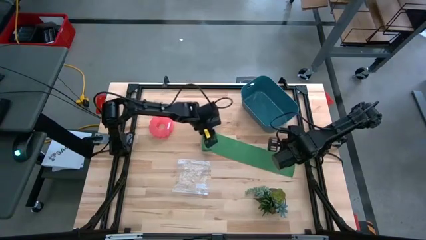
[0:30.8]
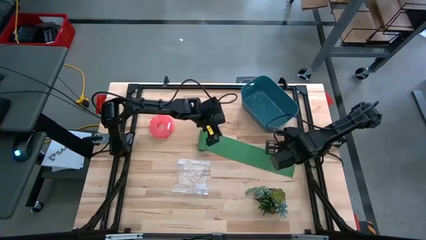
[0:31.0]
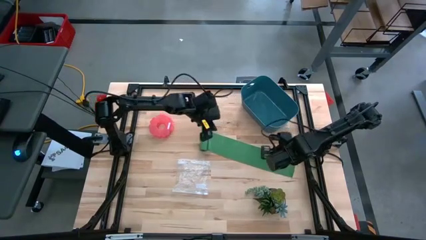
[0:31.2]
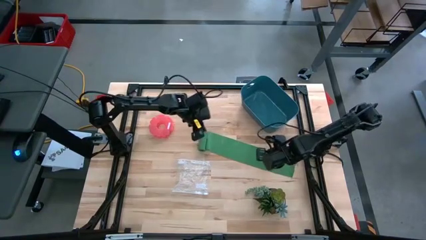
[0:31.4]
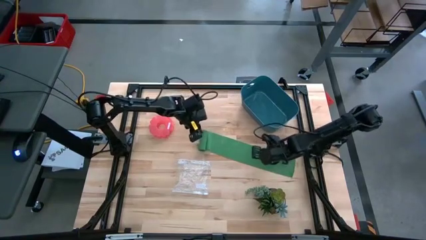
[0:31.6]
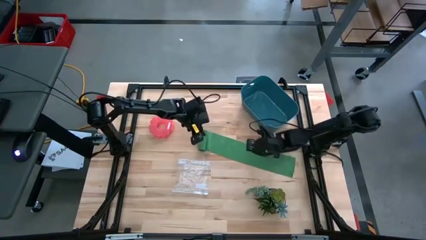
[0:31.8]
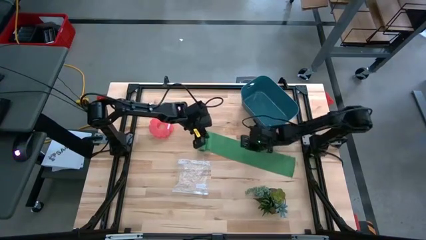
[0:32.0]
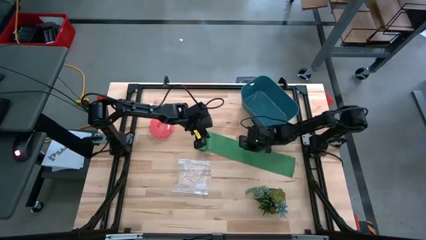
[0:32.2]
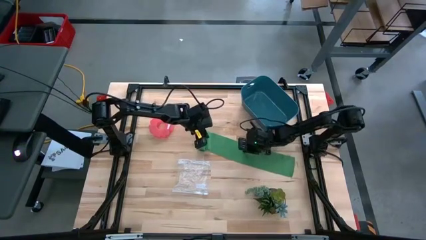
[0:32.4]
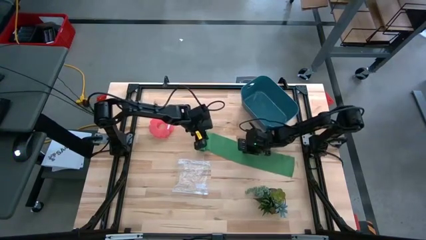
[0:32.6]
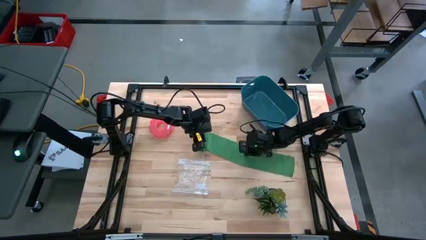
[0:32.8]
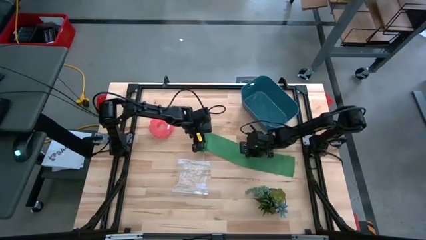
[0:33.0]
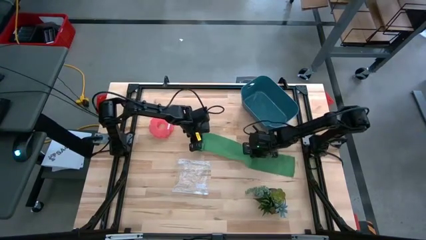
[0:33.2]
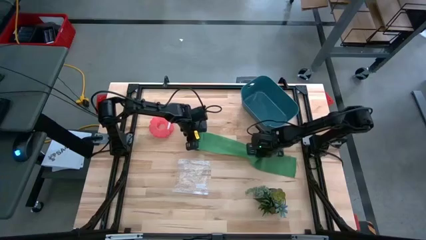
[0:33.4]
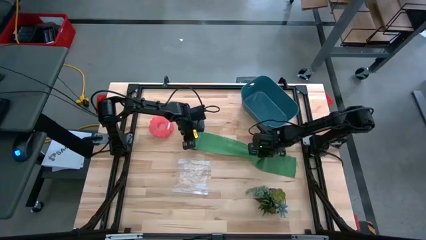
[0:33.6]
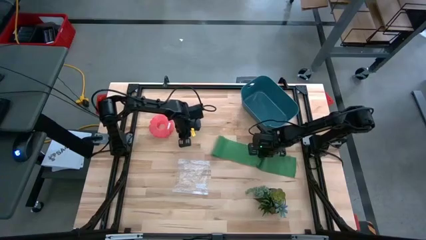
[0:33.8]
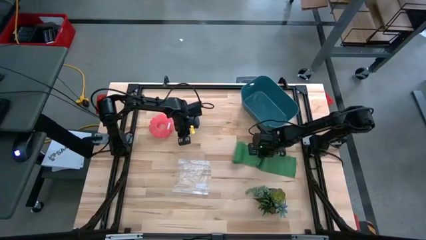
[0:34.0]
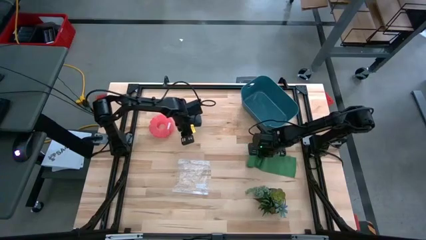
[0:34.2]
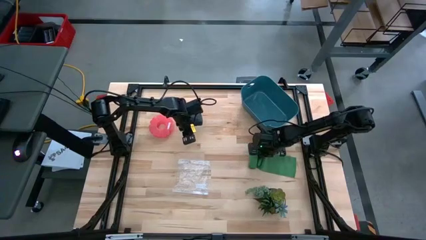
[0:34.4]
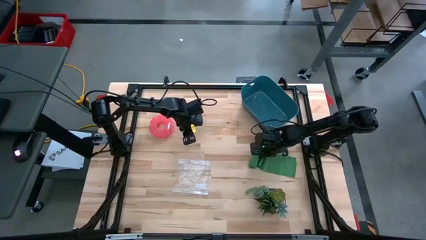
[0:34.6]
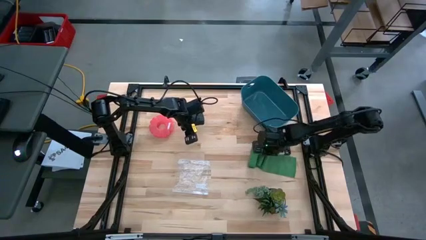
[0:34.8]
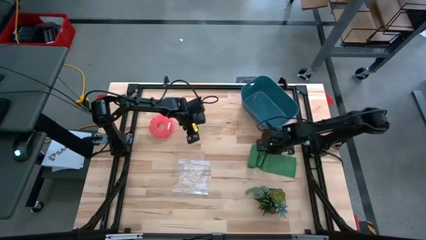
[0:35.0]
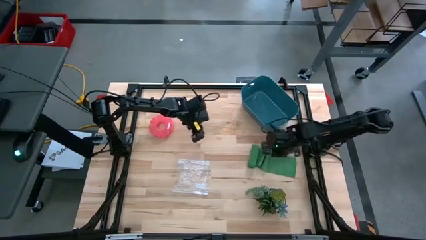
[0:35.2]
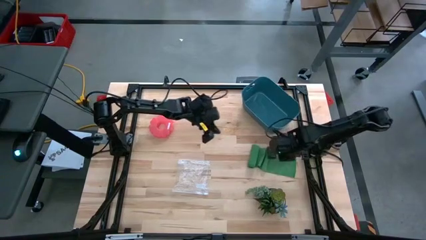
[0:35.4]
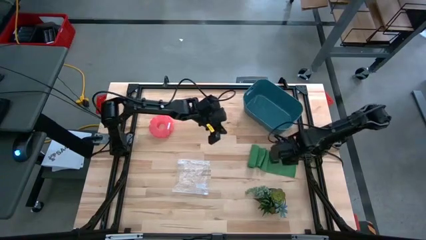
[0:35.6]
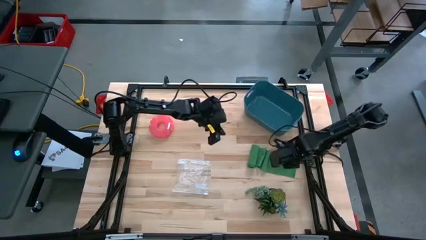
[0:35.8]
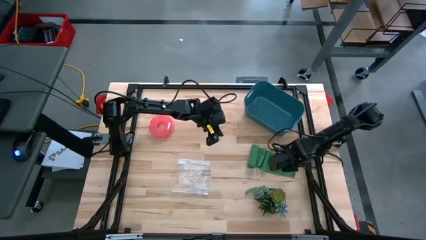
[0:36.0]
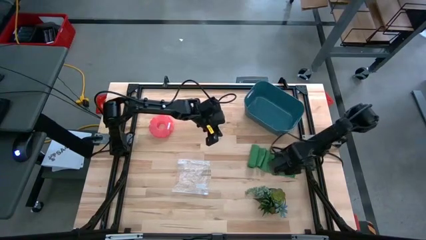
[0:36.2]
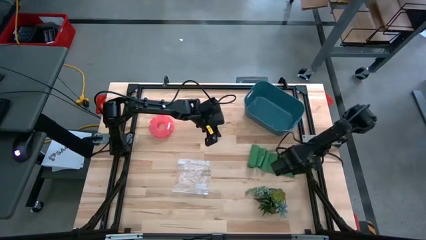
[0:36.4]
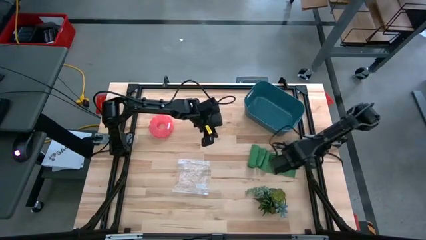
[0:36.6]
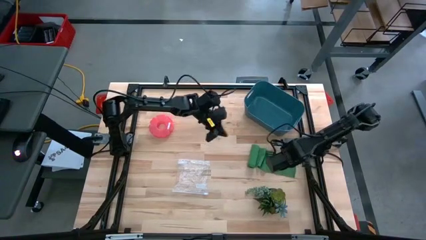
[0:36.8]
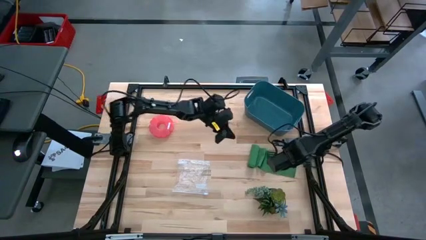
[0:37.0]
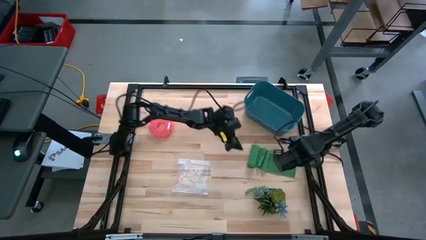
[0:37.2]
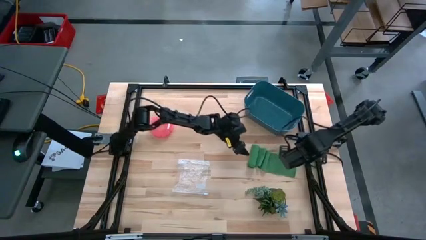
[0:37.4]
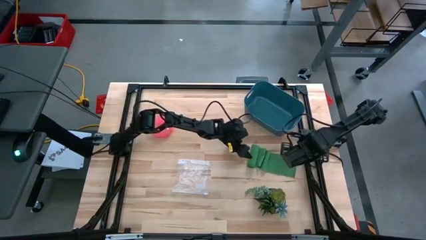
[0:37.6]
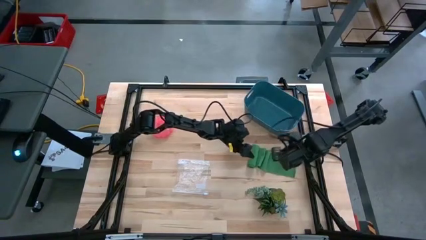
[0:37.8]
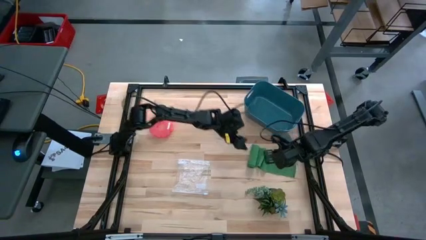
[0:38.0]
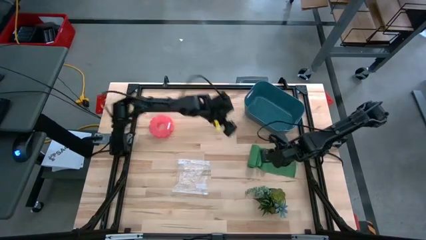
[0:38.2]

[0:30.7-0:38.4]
Task: Roll bandage
Roll the green bandage

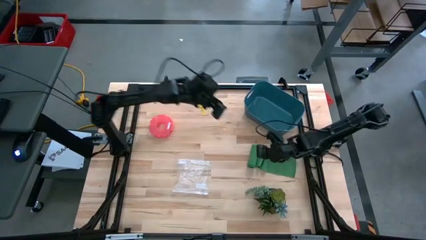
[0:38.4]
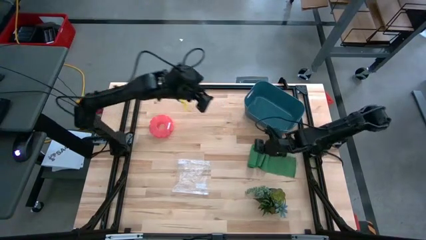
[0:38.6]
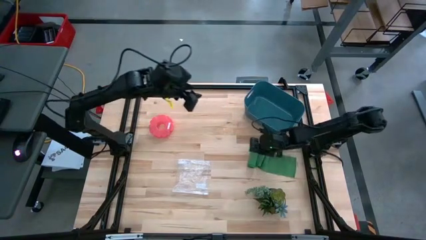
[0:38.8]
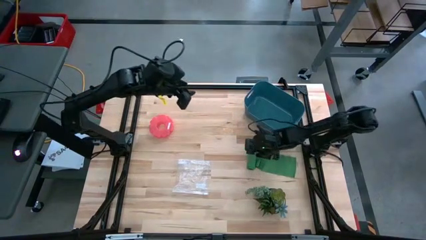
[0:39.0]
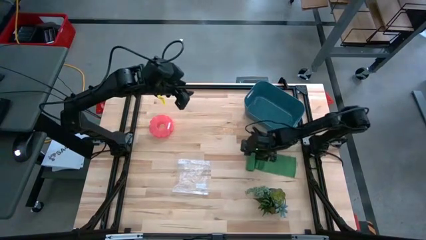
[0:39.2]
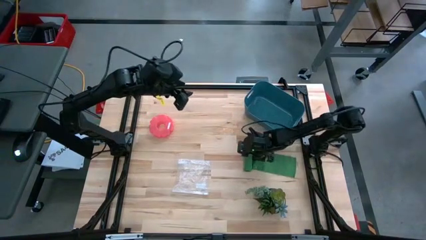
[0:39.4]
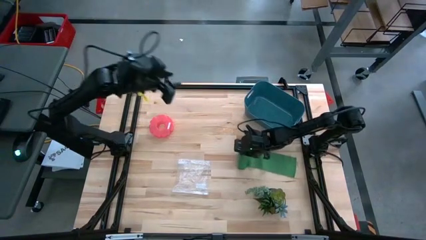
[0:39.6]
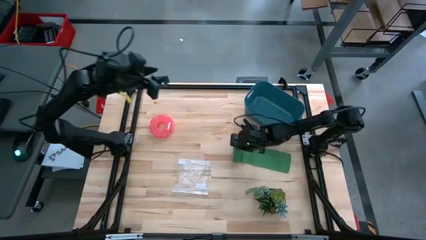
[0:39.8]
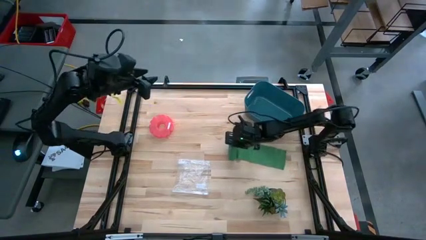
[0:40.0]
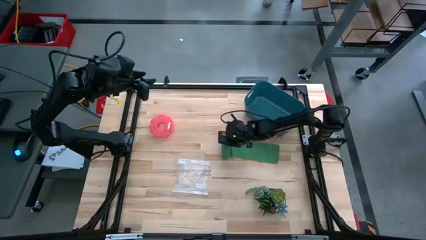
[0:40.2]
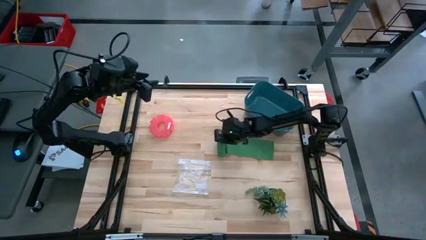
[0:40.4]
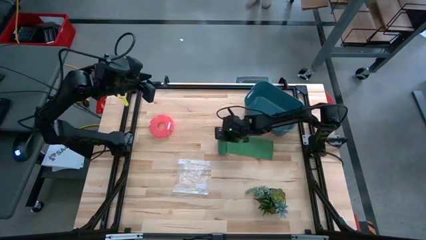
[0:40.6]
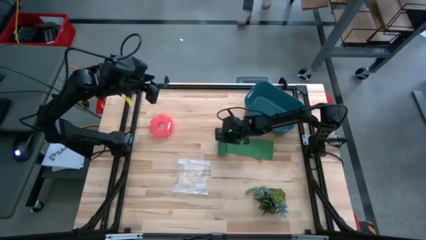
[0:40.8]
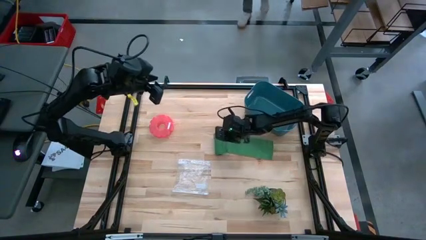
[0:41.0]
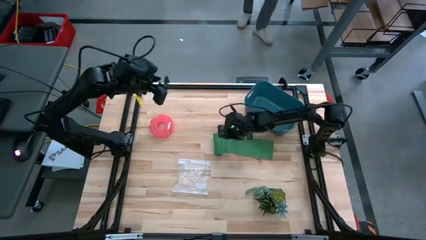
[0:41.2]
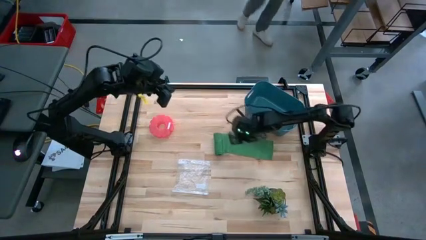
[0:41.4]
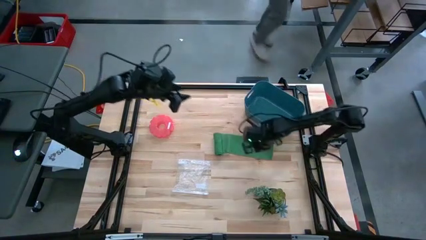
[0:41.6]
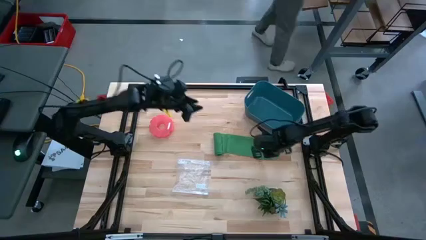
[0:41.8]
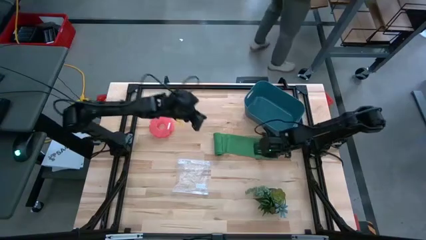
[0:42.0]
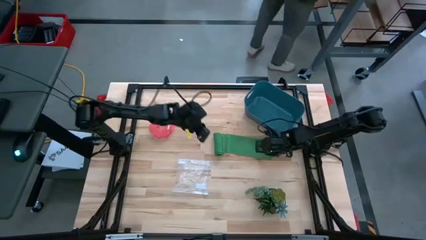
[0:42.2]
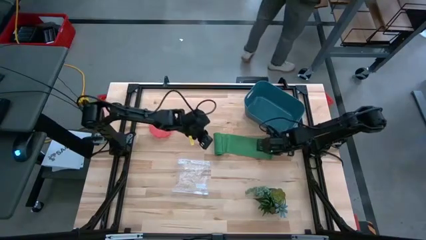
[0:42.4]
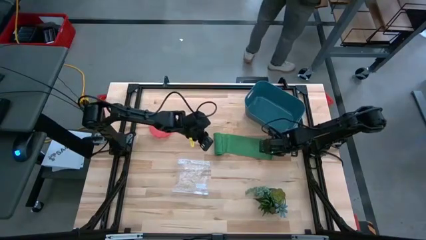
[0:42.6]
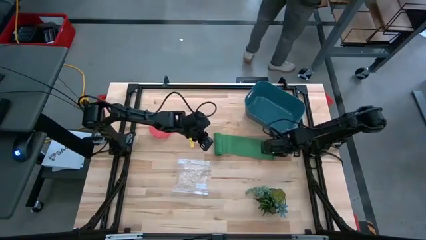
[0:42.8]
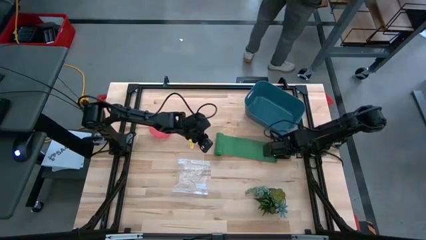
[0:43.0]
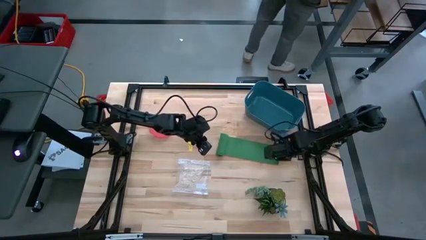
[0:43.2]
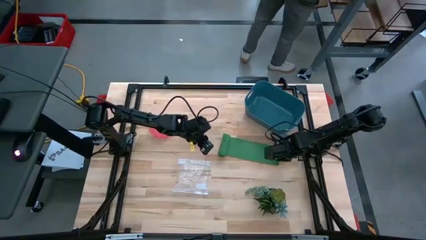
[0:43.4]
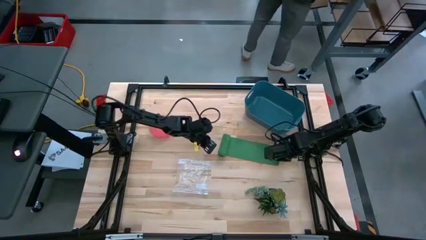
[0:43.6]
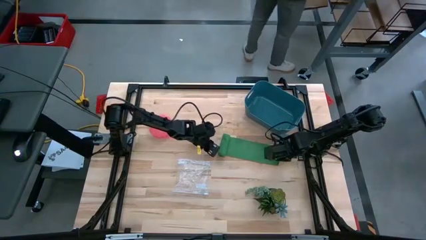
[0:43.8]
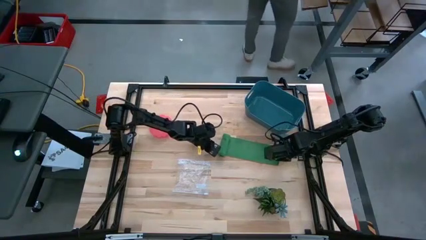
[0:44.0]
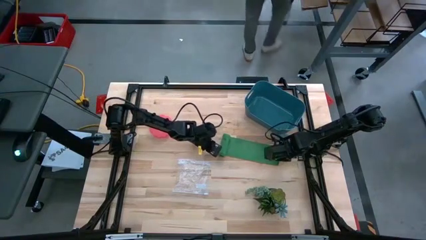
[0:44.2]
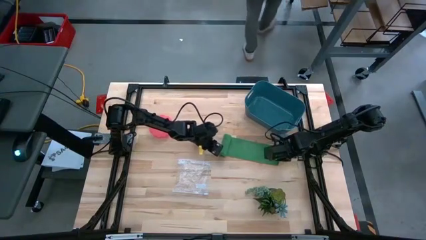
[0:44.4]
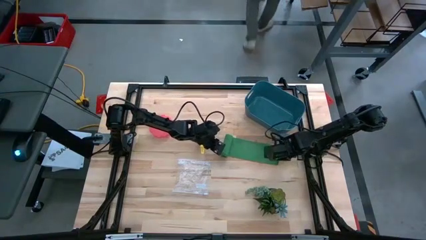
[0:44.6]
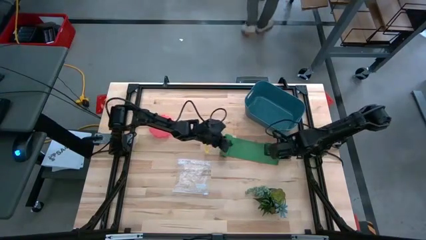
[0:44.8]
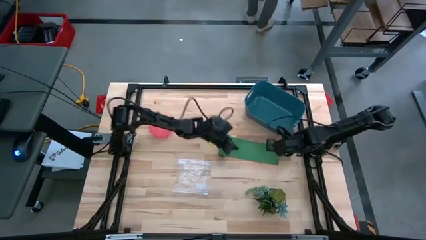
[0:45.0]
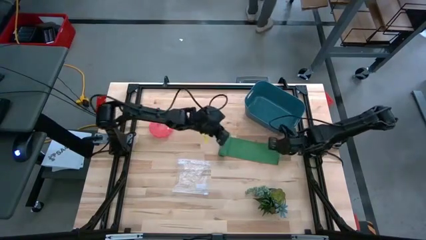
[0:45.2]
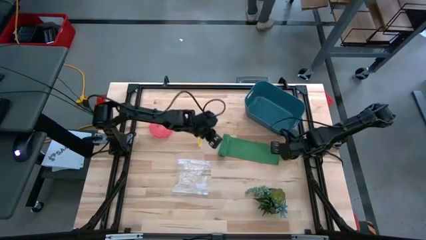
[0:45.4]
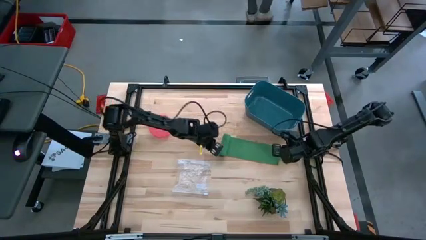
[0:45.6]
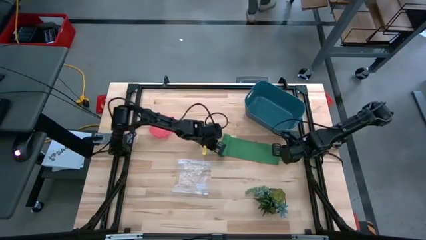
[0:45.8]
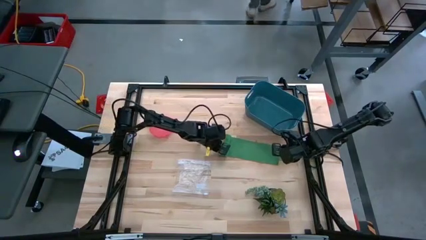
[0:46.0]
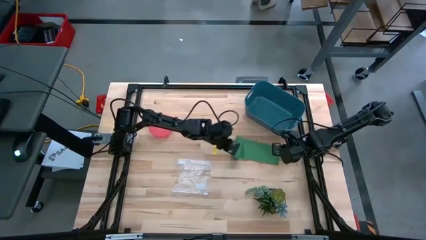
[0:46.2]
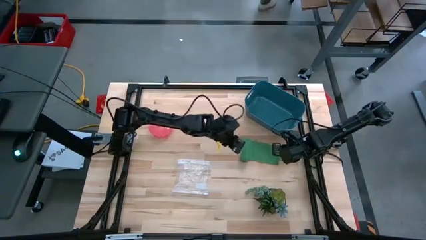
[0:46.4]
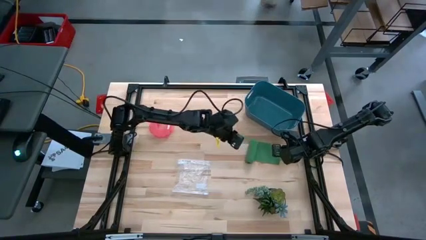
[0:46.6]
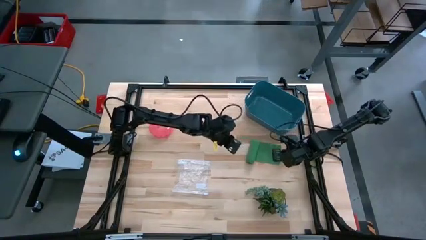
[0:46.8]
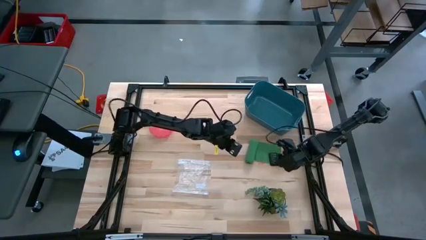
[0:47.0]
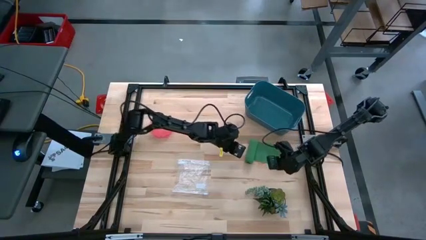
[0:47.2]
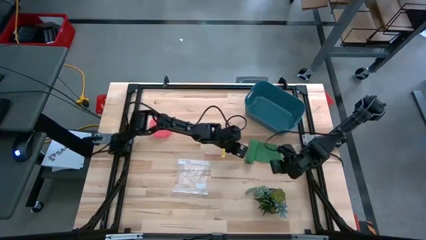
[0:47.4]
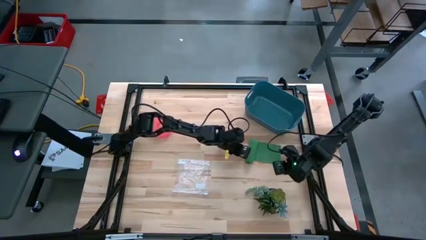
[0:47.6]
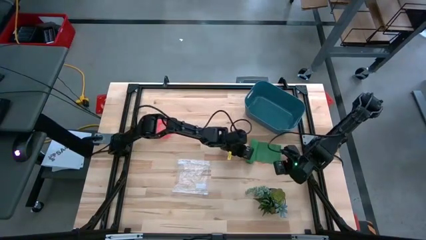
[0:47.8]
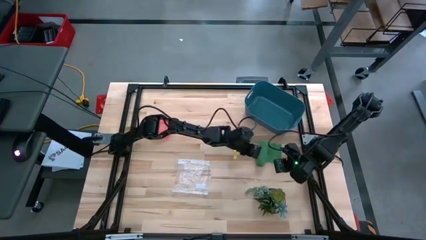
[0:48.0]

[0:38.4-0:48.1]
Roll the green bandage
